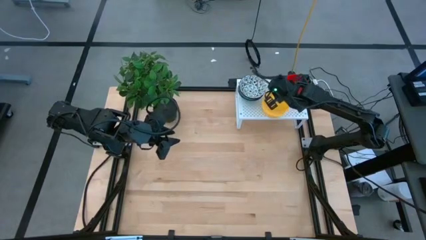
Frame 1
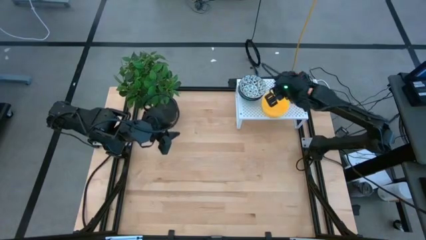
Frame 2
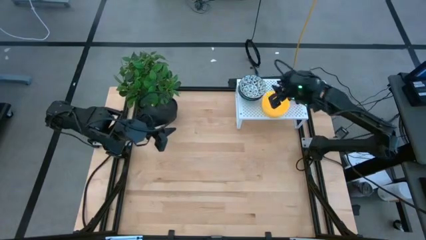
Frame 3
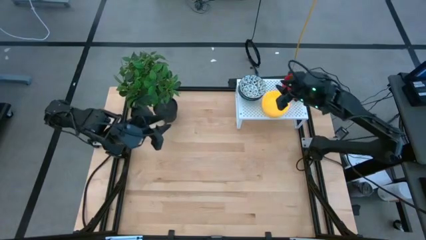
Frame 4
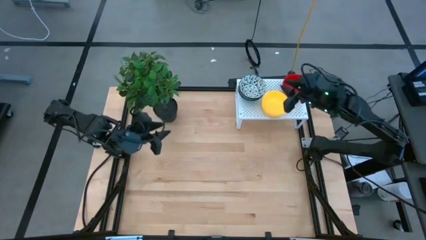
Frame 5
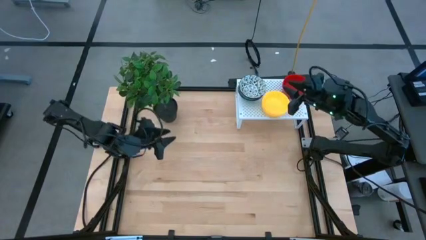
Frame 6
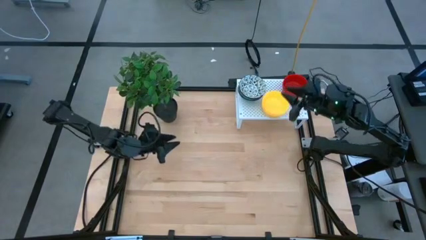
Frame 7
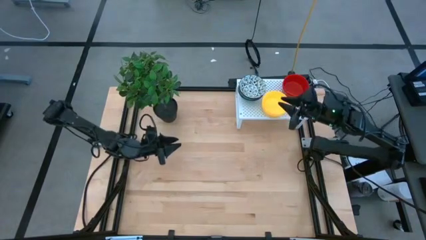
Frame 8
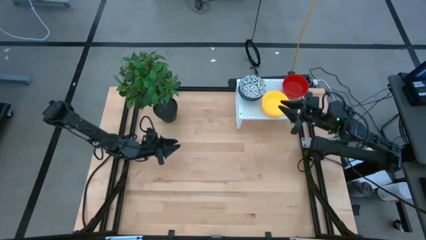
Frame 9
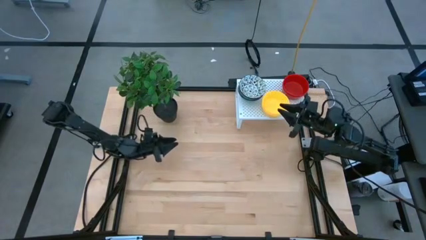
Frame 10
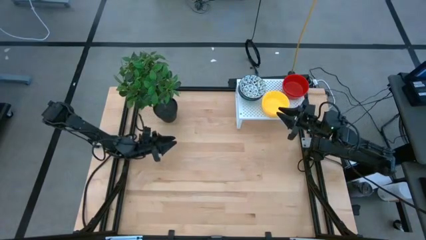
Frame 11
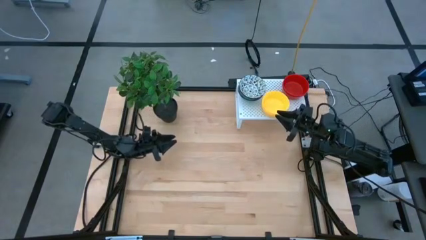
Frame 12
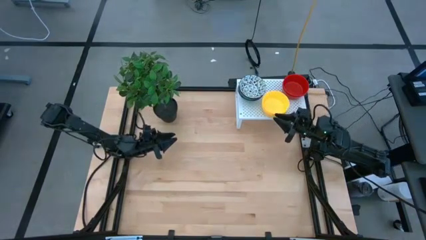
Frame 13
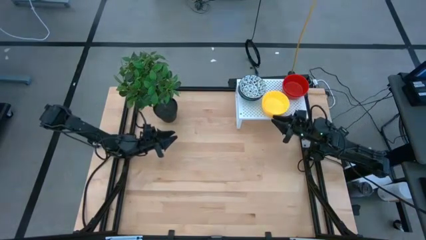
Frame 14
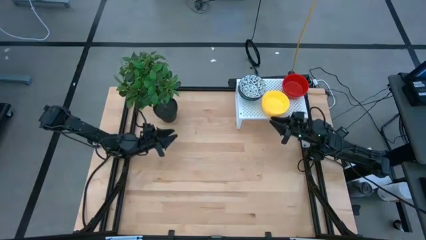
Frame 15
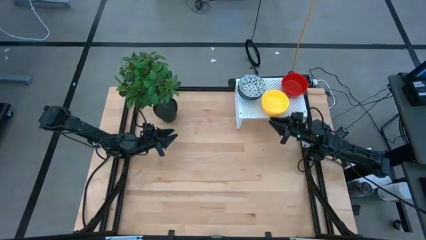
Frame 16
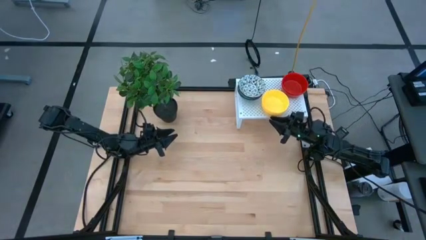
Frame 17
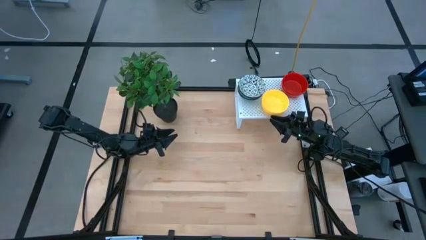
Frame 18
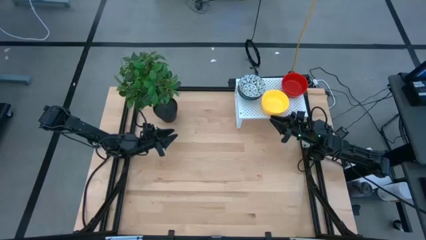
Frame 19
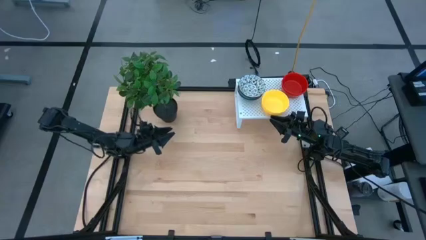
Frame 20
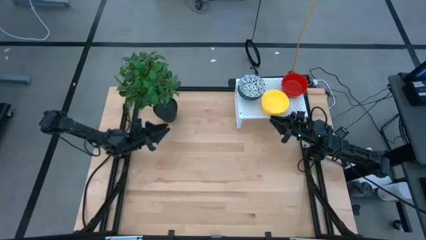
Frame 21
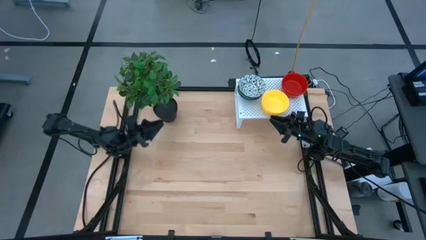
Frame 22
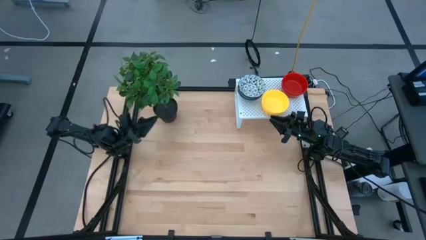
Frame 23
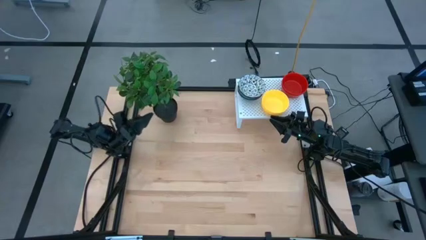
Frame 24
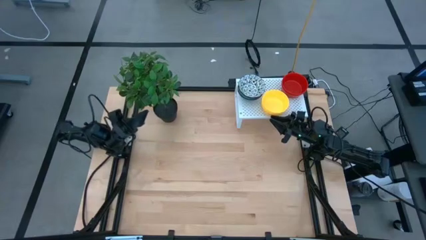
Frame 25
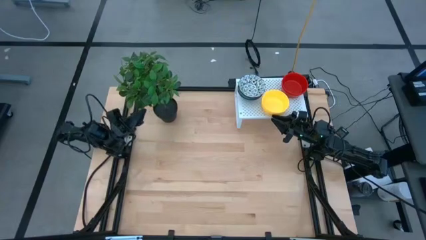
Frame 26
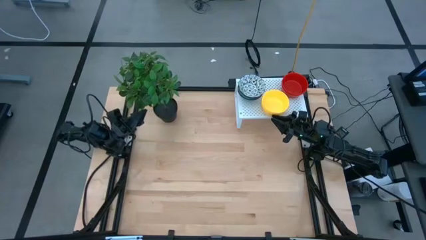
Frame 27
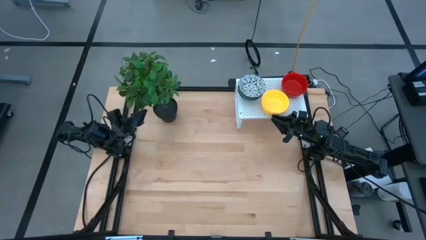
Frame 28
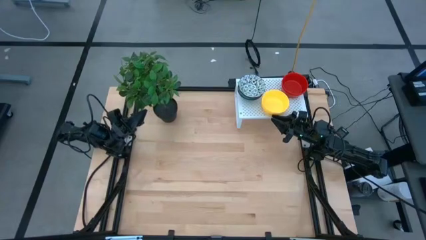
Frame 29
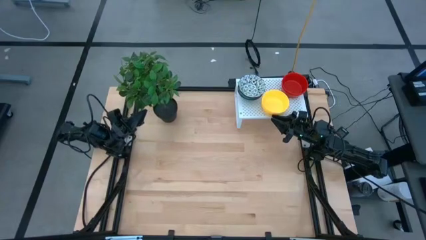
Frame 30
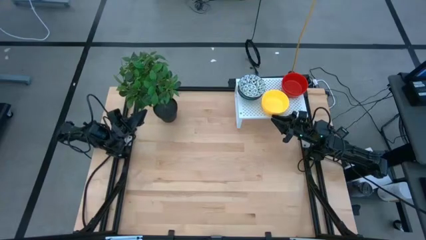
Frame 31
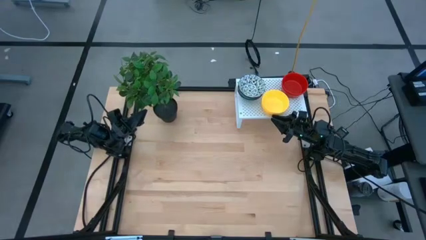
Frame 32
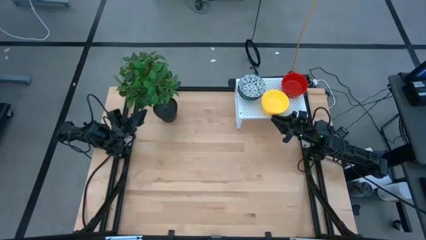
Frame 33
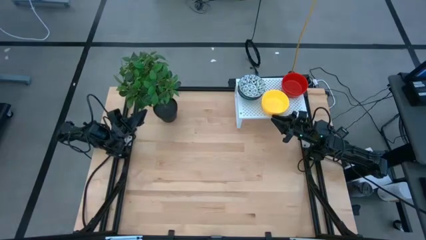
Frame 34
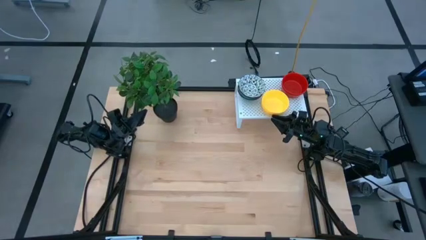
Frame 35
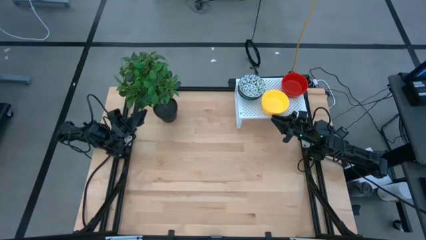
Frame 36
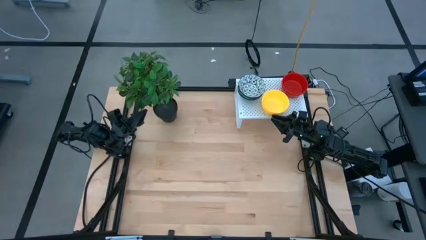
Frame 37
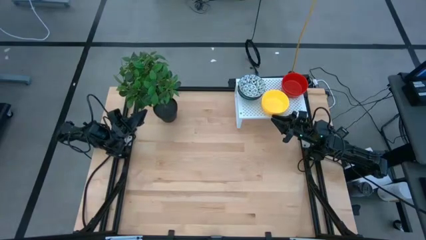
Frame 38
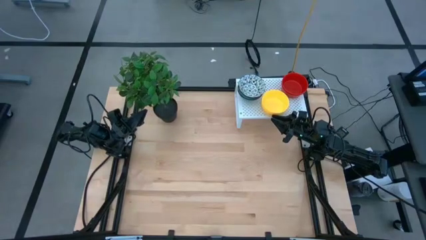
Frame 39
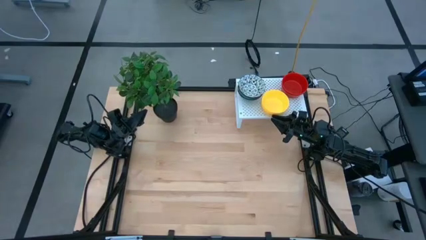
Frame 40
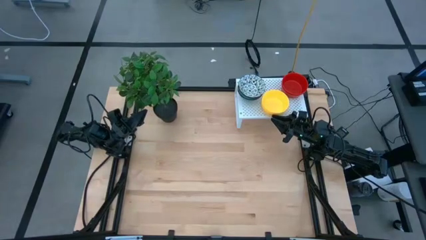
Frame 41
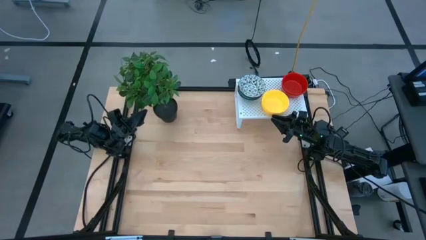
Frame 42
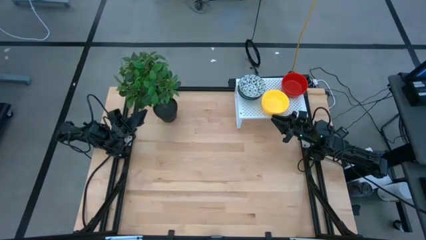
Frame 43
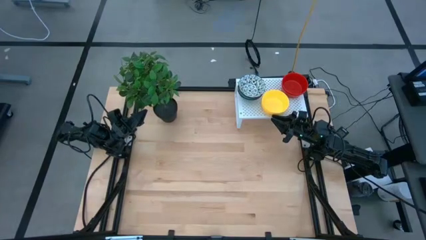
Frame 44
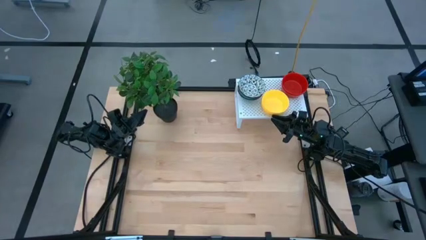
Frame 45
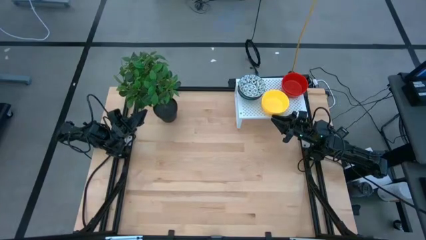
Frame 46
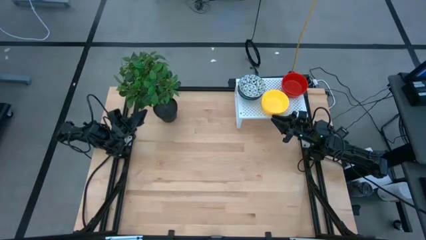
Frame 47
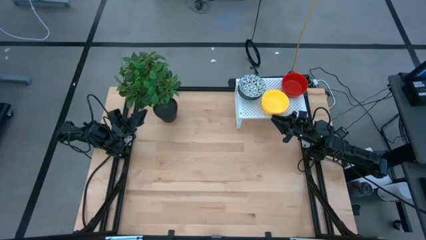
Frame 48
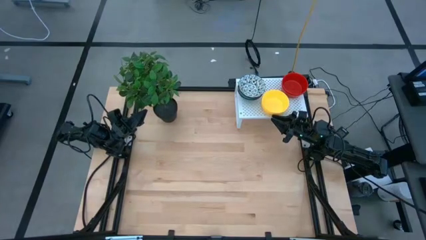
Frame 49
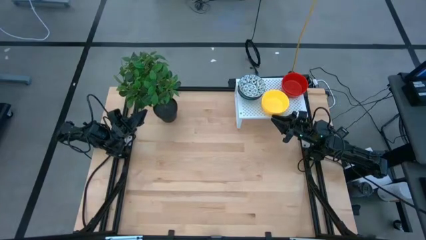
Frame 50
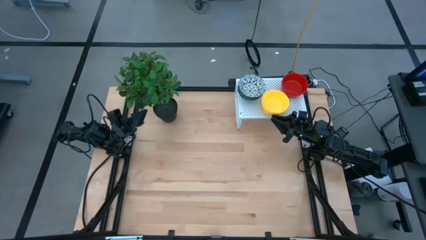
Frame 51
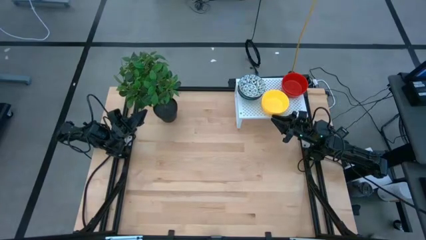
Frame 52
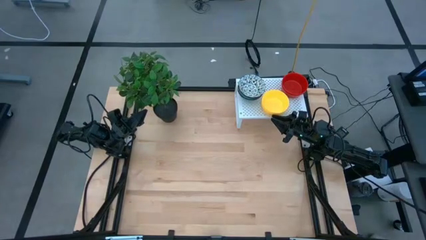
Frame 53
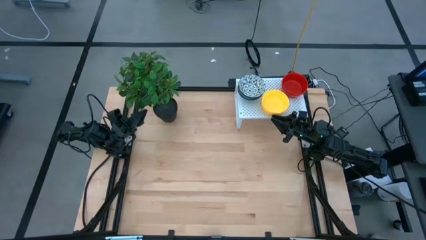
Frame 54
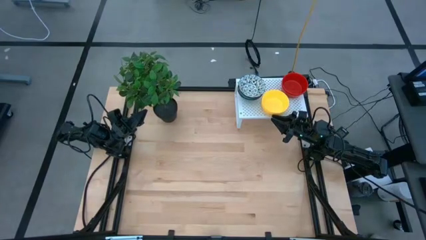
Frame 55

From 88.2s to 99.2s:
Task: Pick & Place Mini bowls
Return to Home Position

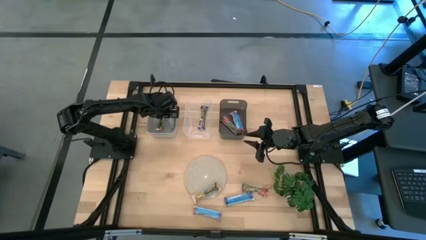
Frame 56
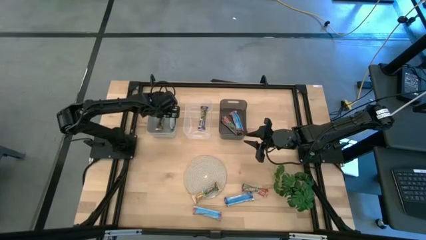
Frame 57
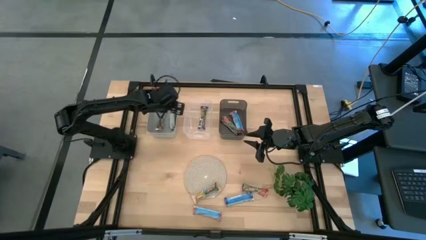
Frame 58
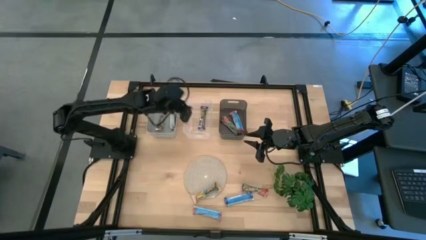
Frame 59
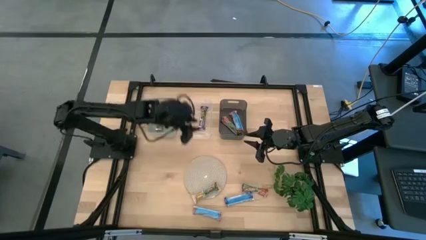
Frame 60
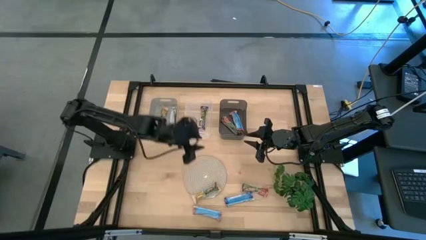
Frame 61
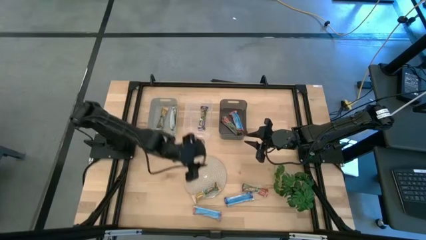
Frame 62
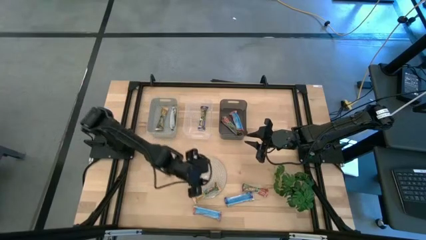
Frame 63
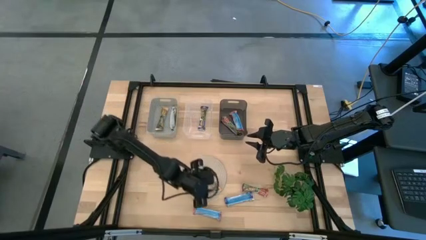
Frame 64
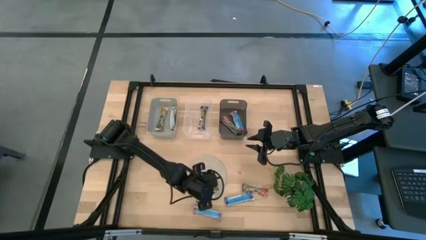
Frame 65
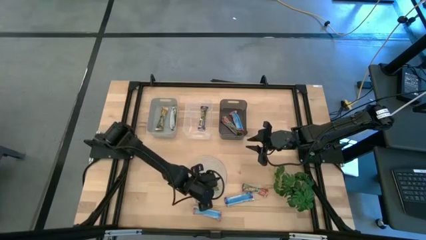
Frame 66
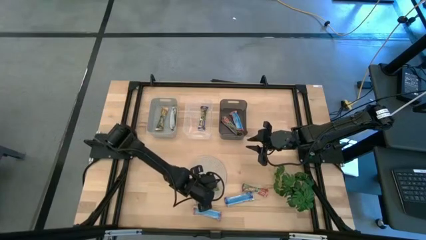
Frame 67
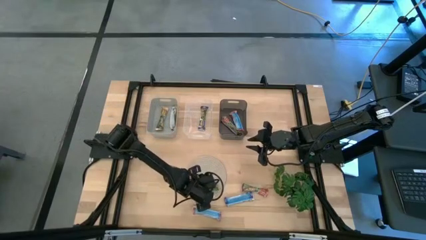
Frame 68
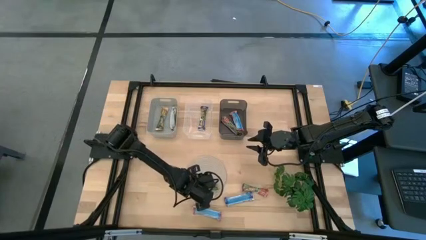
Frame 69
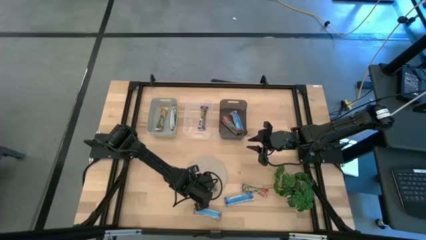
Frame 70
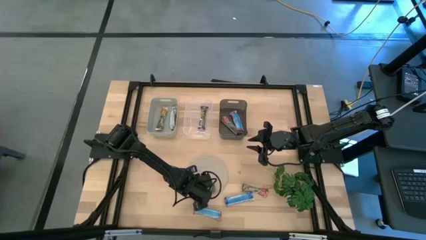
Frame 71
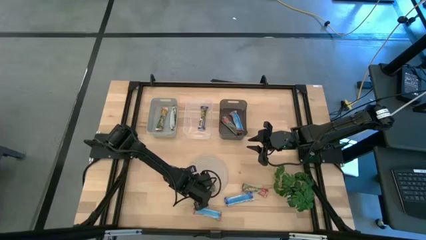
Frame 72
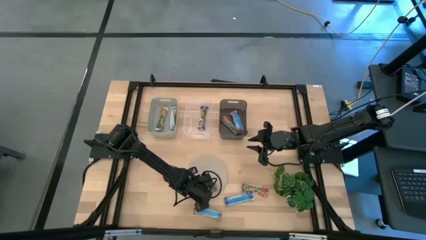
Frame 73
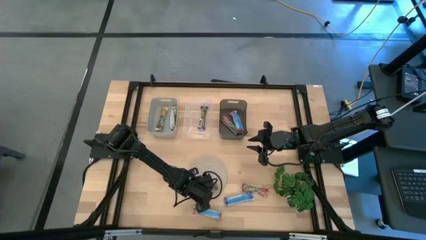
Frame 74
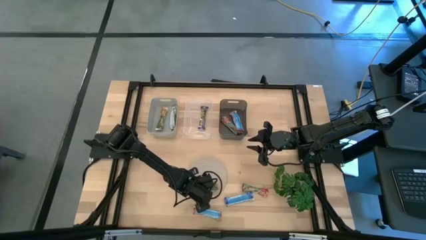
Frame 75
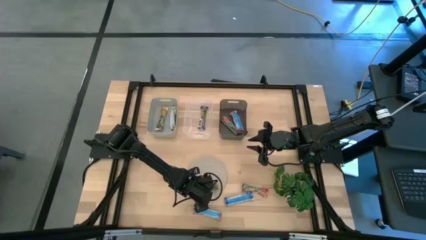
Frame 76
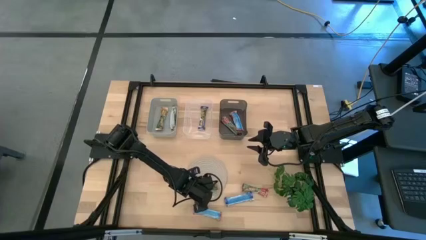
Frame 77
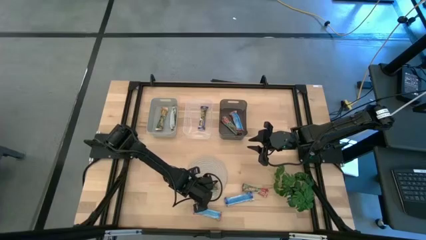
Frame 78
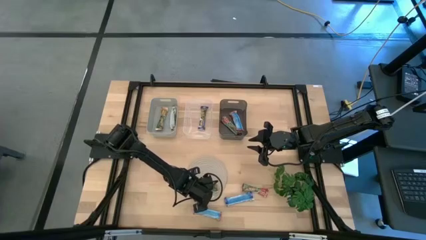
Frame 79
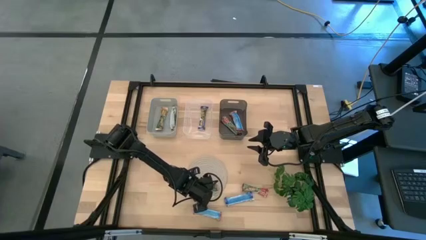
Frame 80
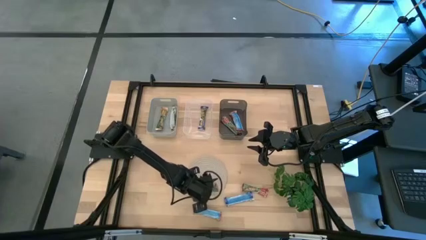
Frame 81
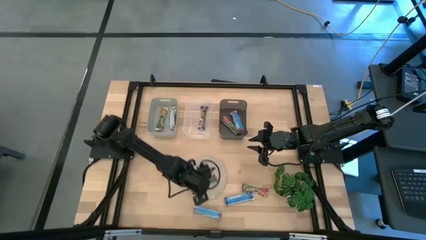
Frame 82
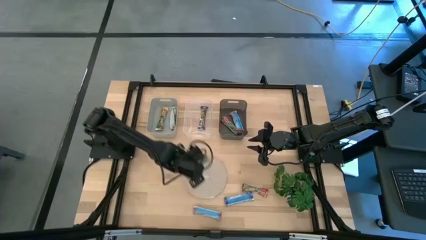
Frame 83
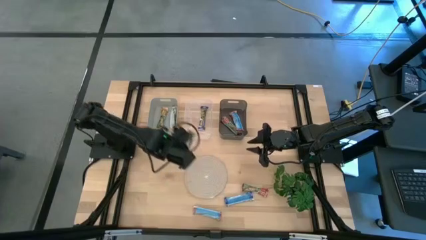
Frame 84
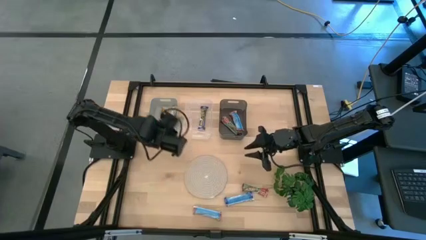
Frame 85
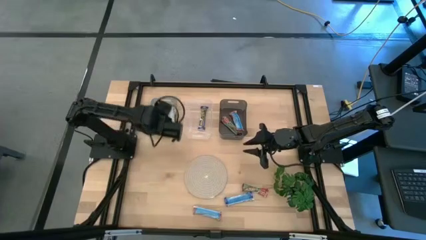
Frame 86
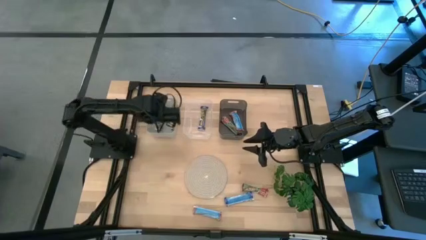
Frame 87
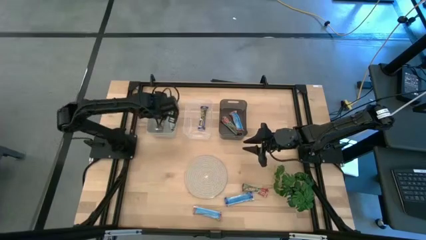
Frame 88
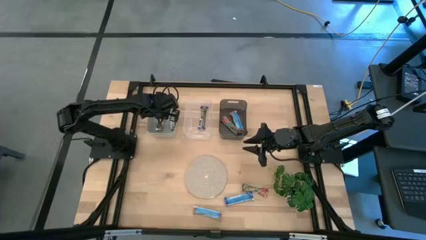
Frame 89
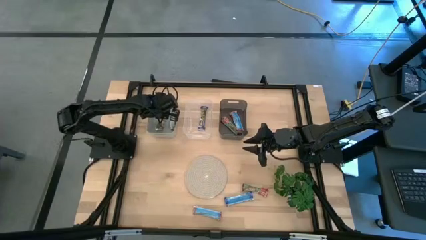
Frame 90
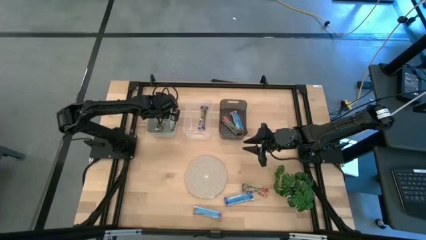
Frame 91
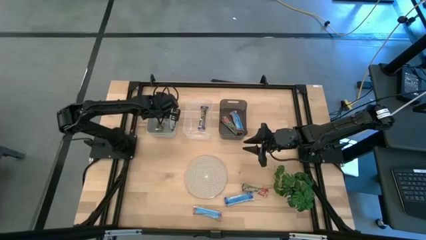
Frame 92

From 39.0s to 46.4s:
Task: Pick and place Granola Bars by type
Put the yellow granola bar into the gray bin
